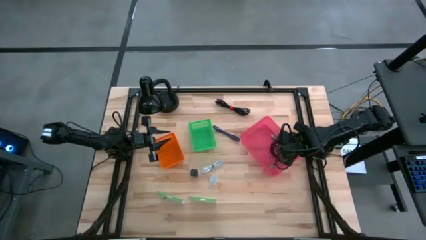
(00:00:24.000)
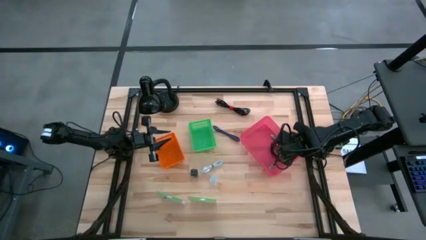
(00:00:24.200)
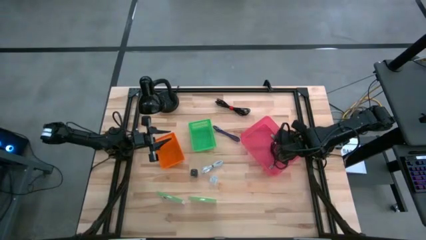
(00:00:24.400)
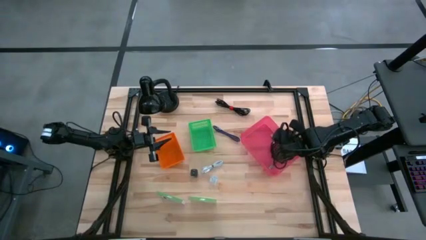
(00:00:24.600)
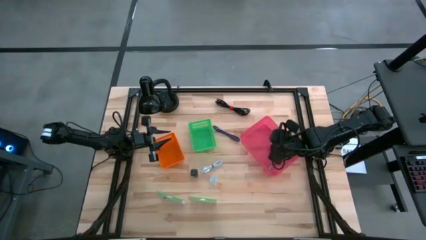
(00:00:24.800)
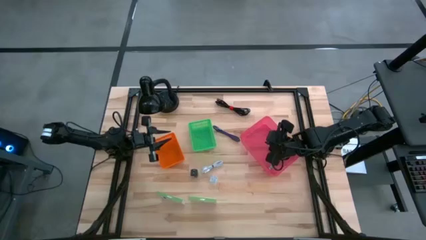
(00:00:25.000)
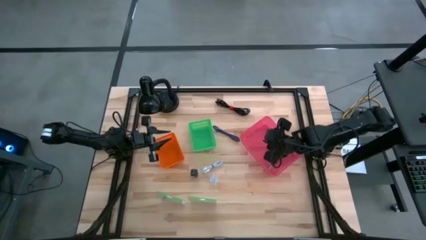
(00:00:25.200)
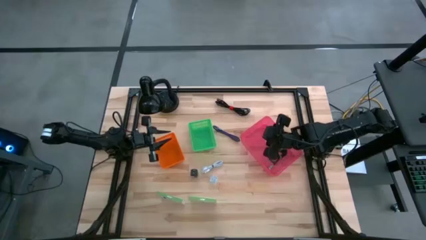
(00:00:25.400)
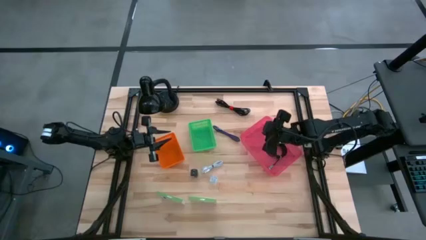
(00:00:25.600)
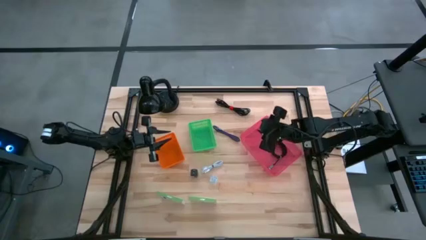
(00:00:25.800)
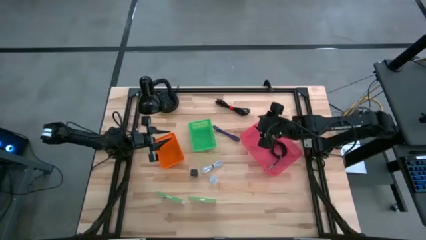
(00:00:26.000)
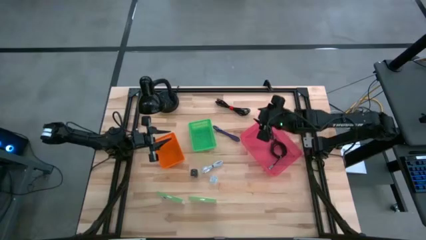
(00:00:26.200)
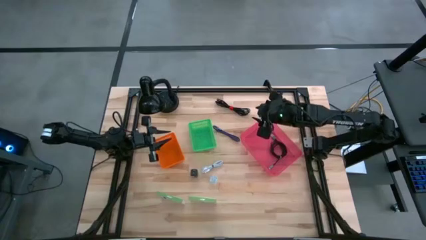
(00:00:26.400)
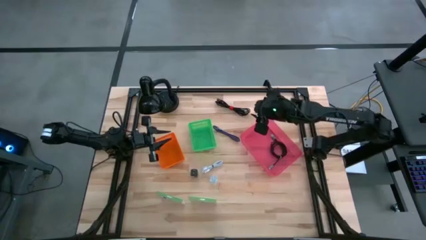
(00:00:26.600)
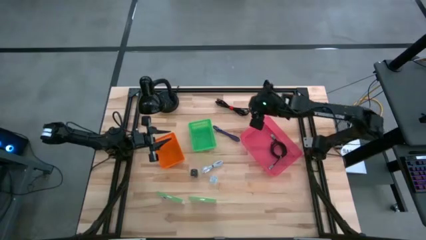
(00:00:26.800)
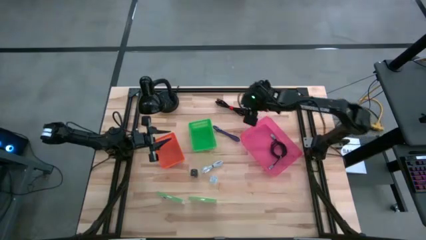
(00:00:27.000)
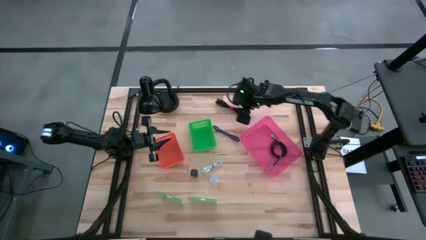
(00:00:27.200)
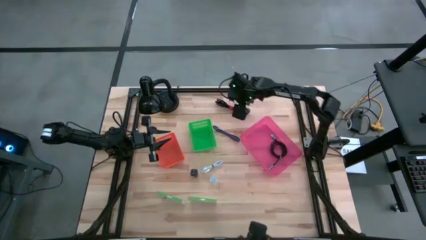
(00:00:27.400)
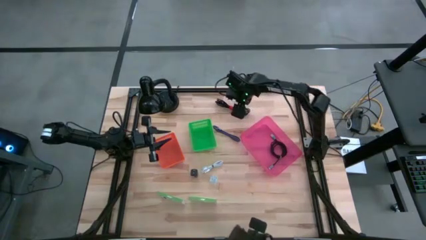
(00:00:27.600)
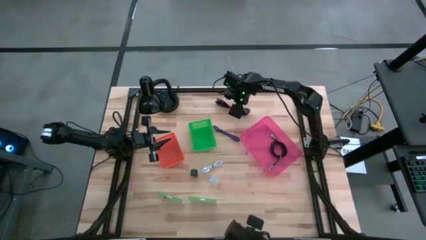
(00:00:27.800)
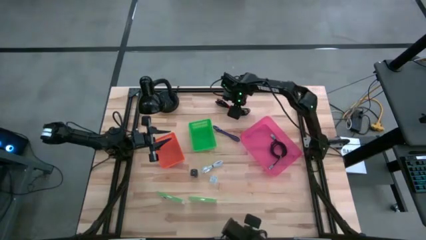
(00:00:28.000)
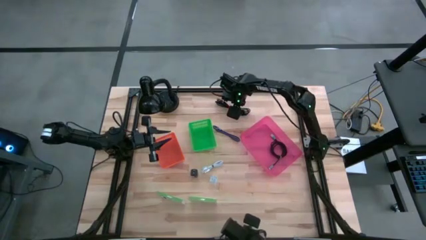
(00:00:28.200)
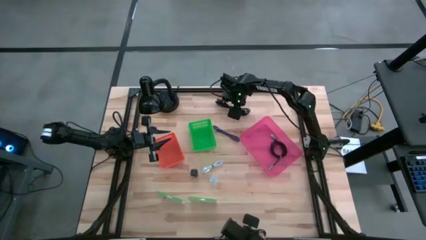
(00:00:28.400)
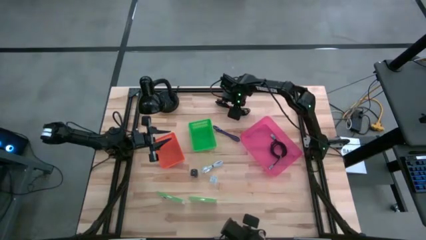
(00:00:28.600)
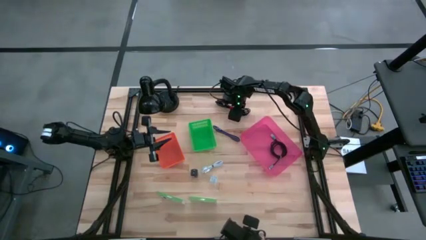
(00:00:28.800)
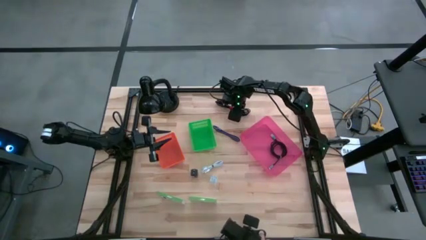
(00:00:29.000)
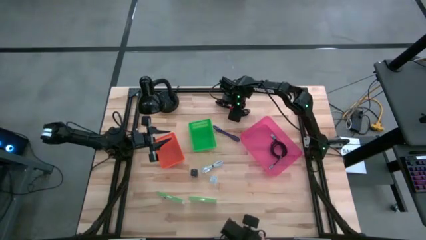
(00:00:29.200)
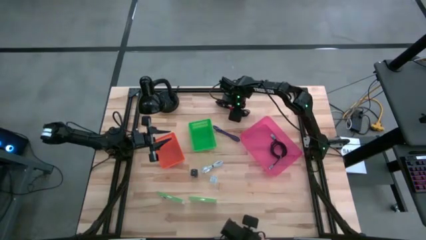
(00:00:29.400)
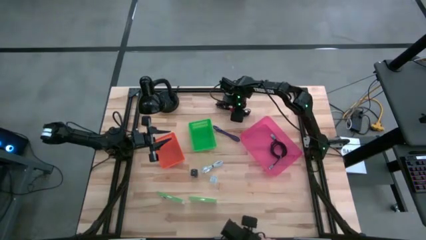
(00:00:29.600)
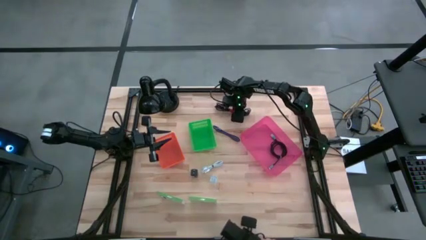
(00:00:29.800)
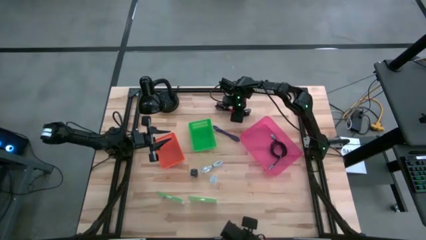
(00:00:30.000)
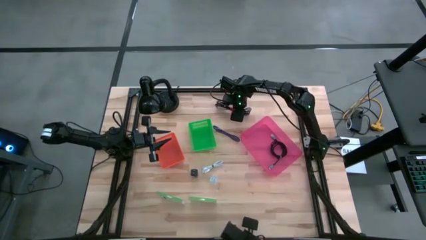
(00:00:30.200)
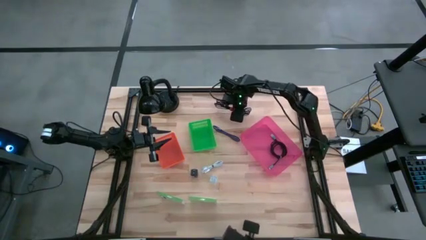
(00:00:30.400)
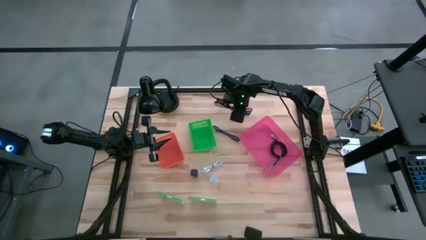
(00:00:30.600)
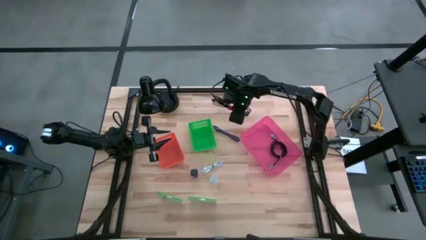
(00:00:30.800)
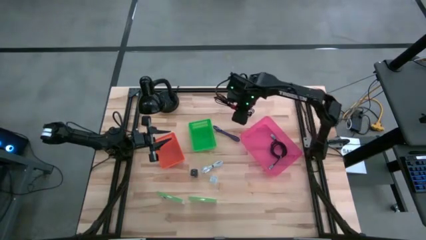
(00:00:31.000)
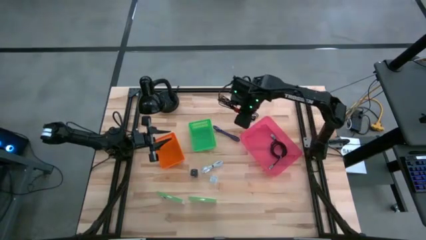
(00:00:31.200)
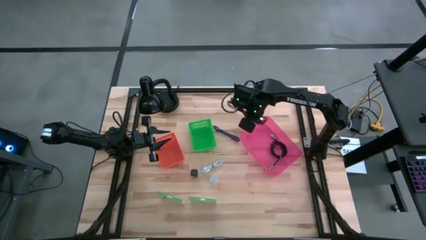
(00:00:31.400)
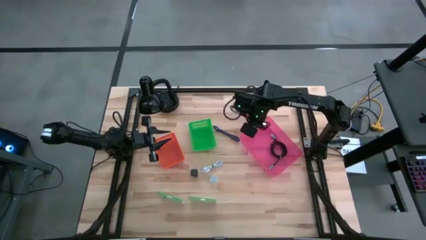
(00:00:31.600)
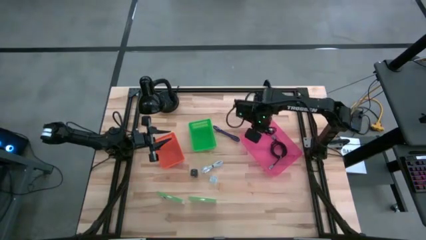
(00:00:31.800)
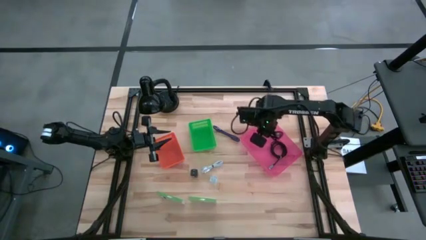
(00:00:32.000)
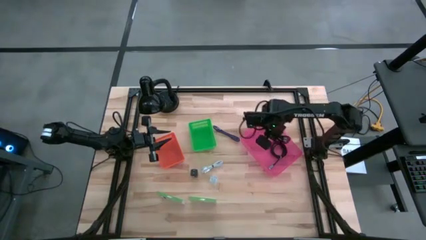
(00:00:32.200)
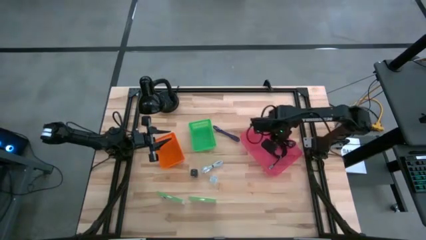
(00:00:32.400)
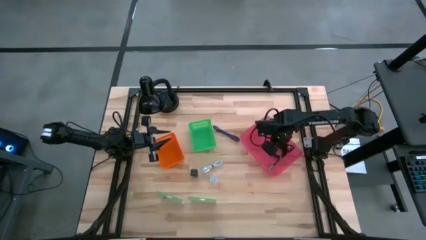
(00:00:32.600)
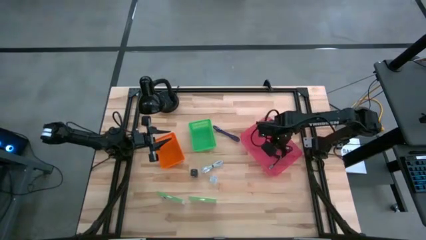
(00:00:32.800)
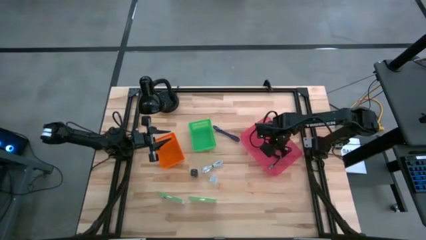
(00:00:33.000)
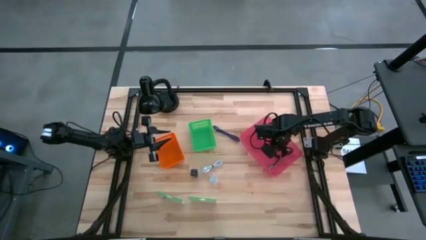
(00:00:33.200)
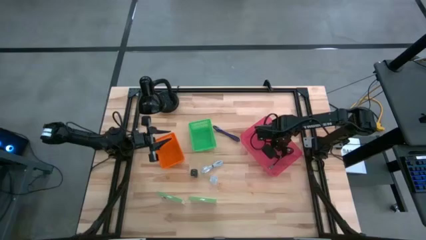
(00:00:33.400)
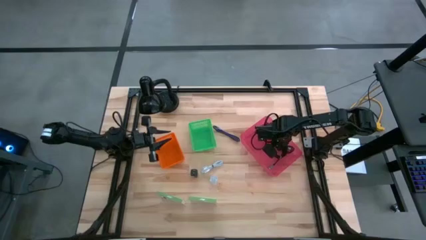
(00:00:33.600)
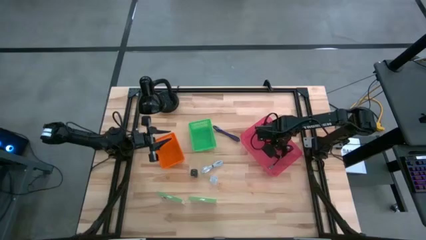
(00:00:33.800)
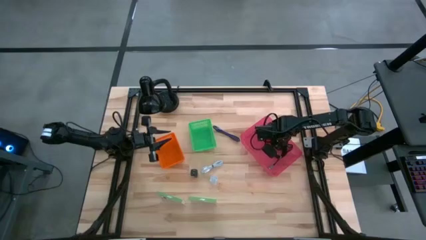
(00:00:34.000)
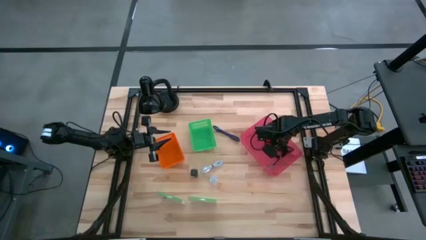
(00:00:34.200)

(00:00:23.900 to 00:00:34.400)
Task: Pick and place items into bin
Put the black charger cable into the pink bin

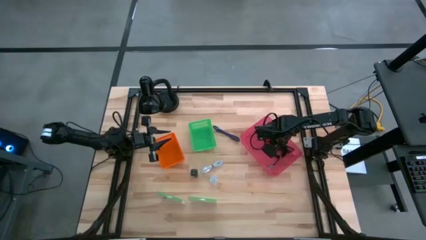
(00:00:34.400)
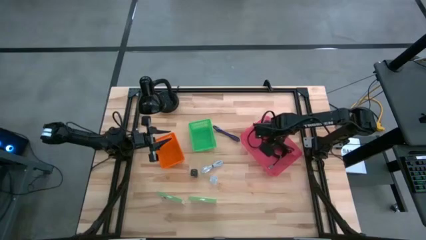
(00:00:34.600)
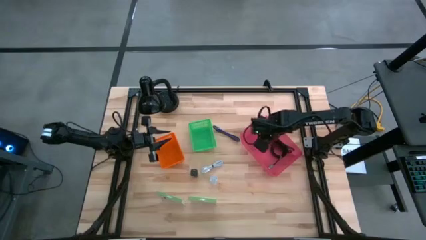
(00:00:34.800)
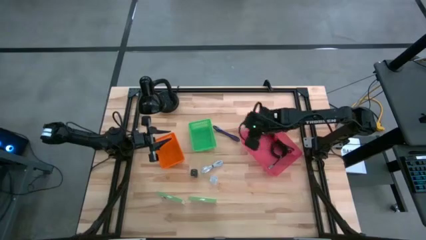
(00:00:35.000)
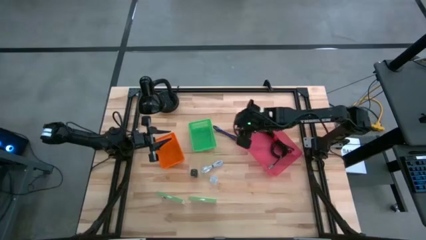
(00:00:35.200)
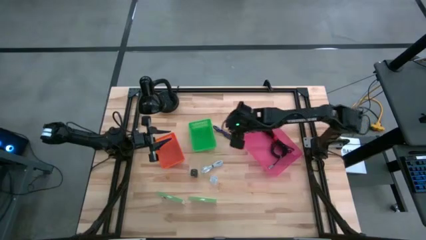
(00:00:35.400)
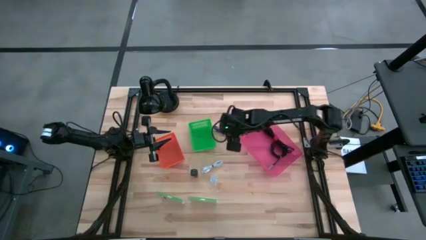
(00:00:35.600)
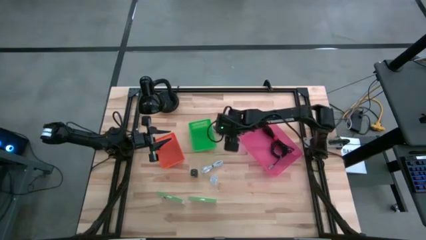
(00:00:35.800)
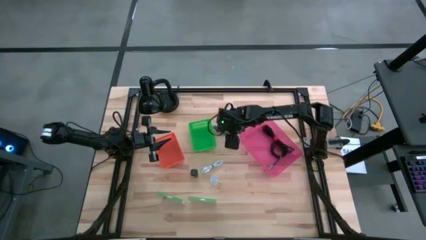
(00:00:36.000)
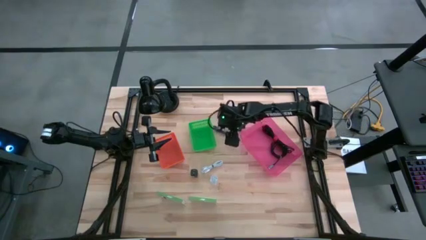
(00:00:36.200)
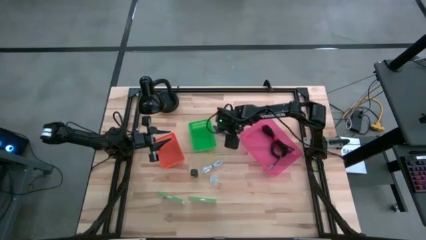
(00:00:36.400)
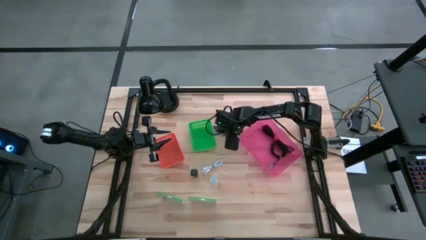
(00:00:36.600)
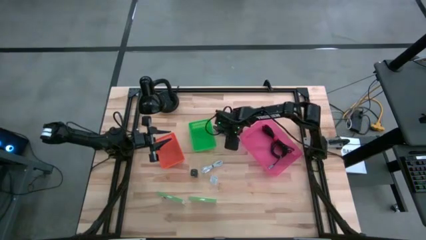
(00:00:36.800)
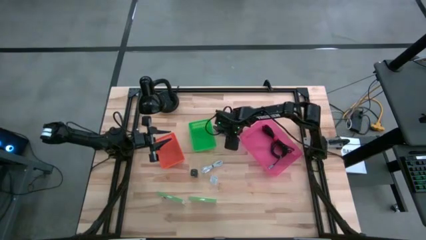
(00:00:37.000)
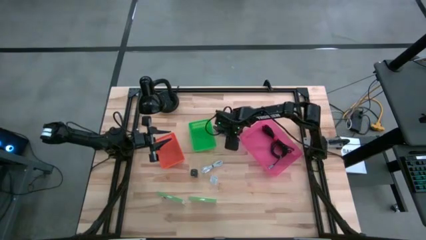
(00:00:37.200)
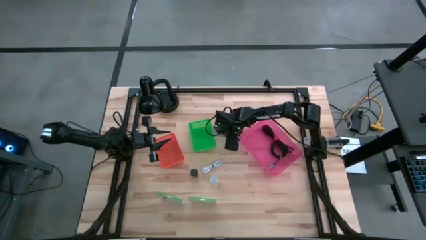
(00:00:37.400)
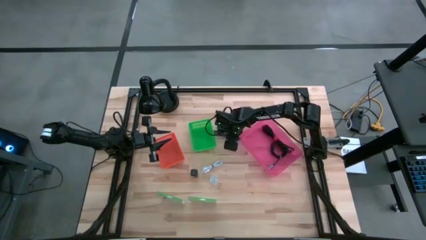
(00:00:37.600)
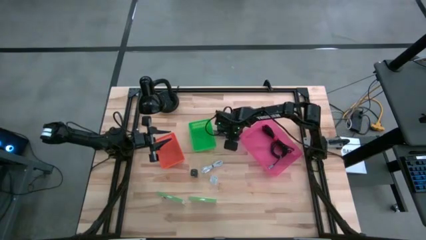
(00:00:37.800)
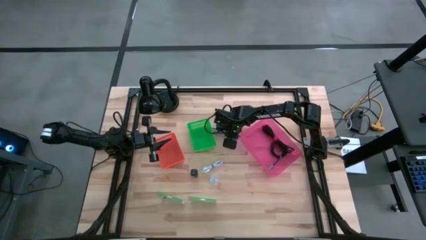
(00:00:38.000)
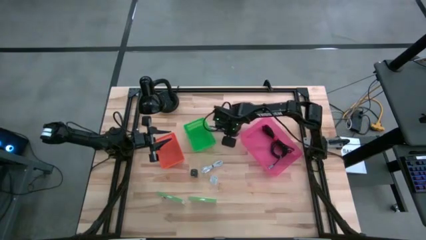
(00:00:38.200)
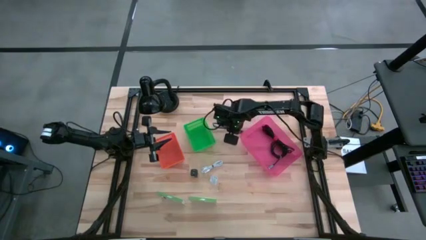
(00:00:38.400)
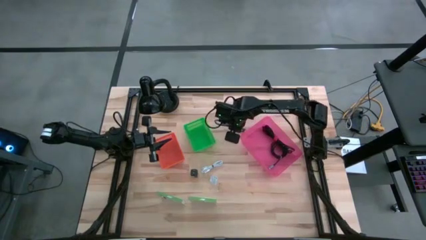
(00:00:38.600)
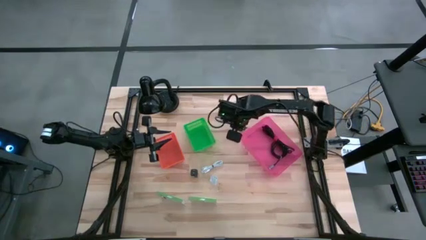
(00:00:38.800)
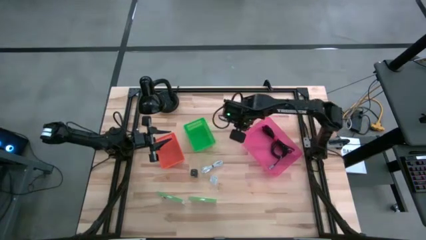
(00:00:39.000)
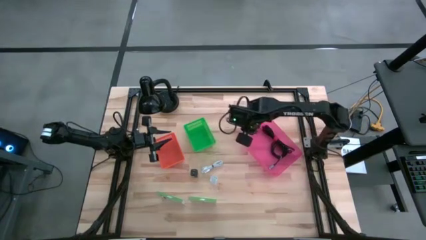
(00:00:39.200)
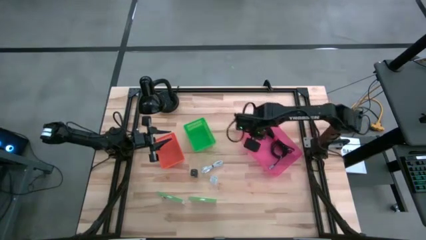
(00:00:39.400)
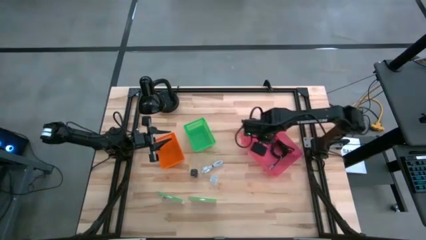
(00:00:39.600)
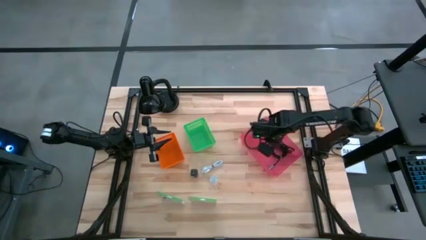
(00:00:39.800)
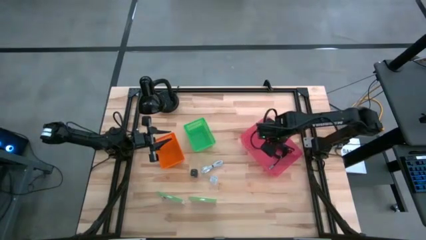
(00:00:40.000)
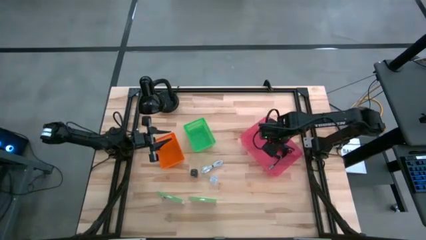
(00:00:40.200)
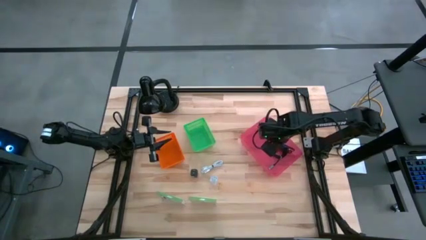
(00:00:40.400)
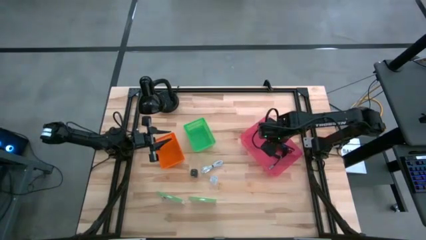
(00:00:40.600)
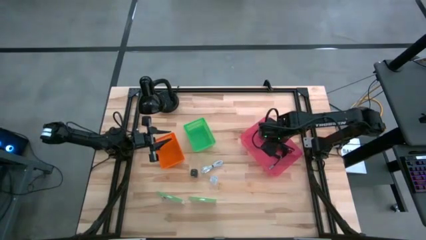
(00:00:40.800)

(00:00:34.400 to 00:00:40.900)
Put the blue charger cable into the pink bin
